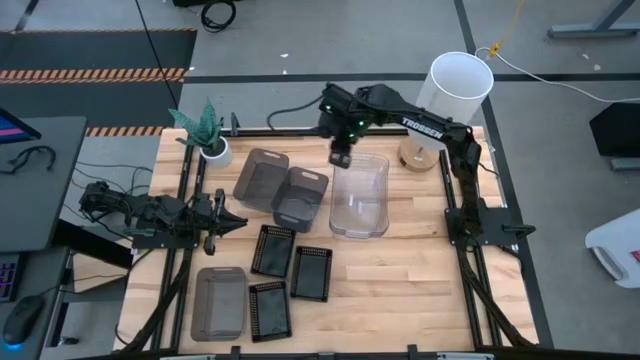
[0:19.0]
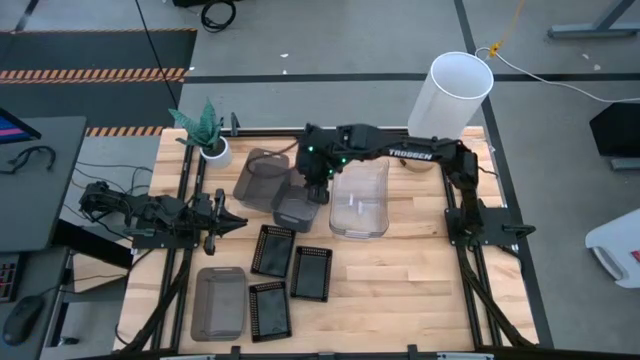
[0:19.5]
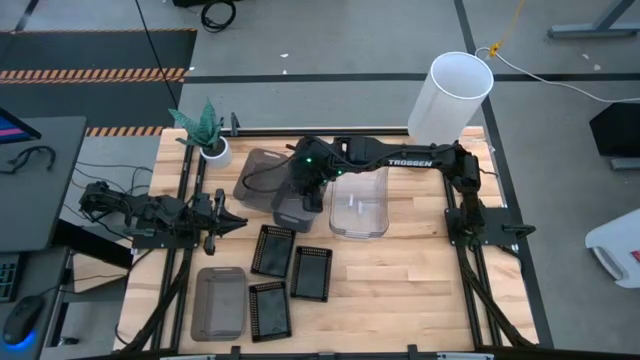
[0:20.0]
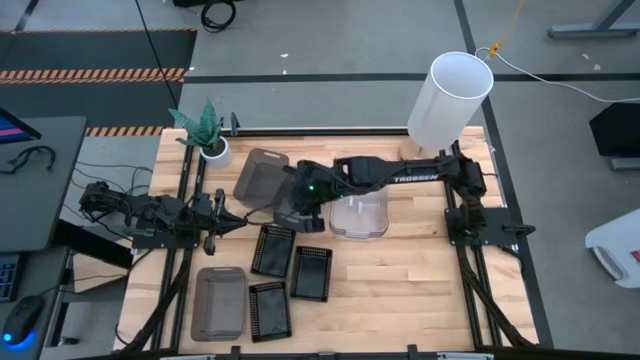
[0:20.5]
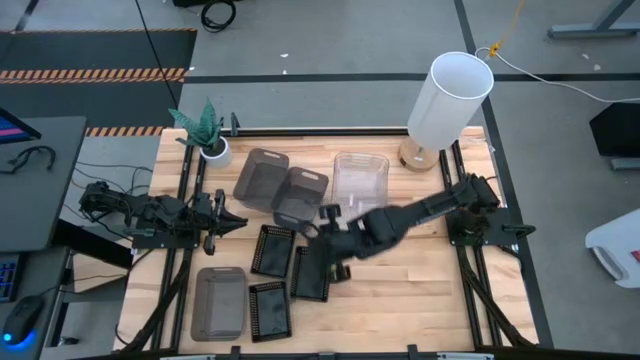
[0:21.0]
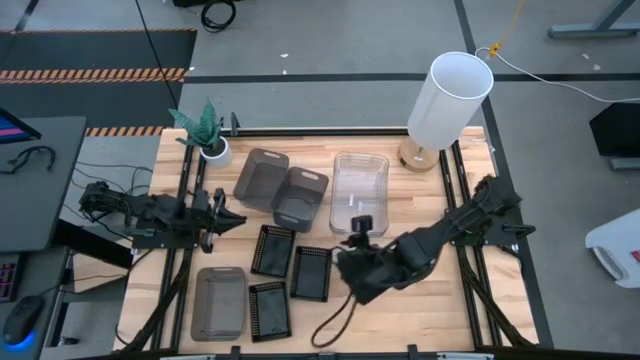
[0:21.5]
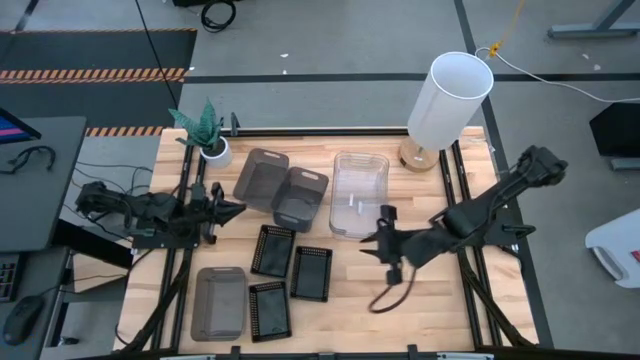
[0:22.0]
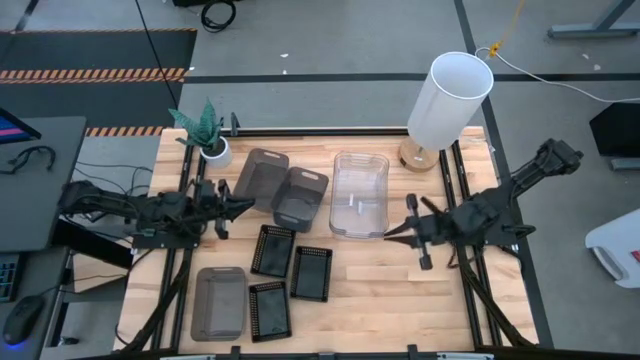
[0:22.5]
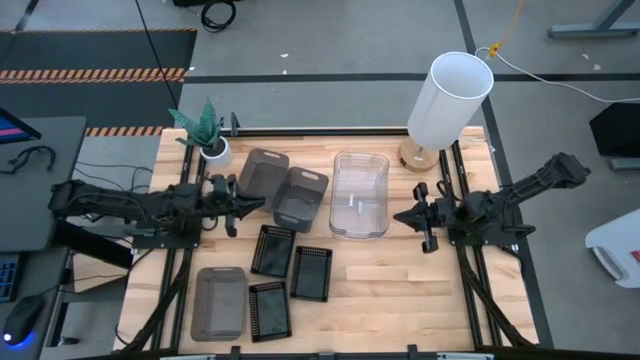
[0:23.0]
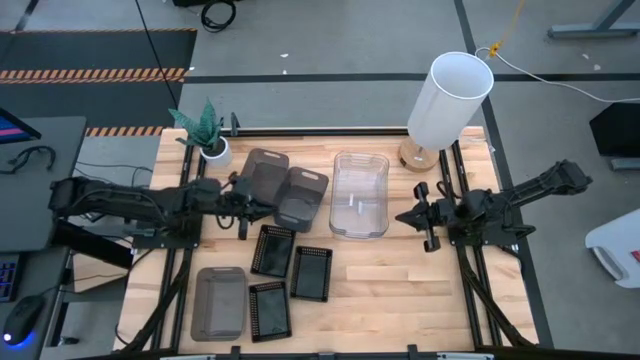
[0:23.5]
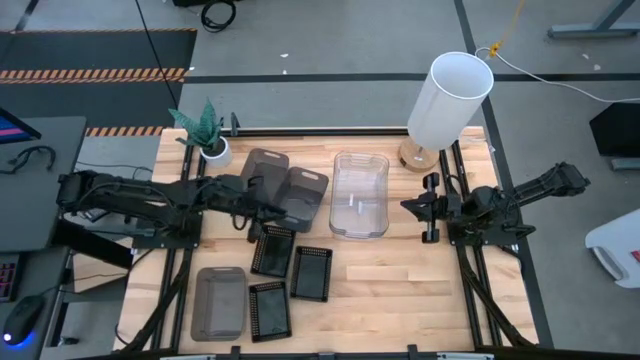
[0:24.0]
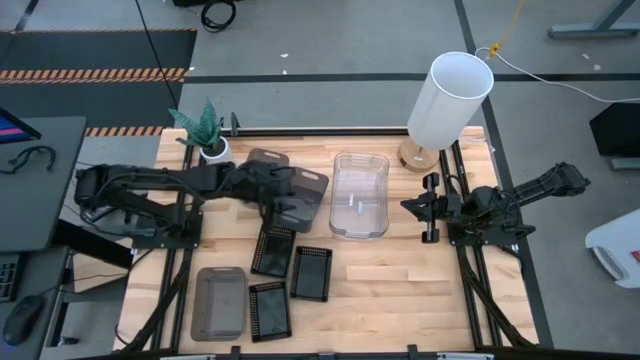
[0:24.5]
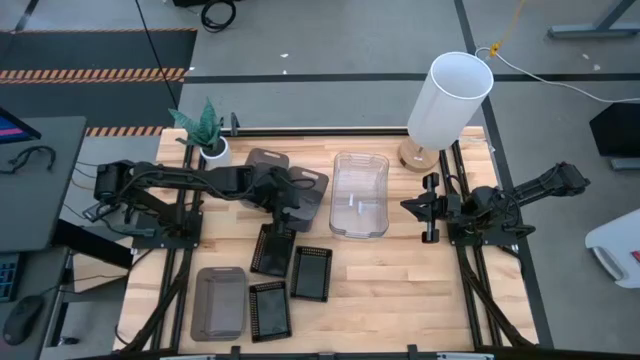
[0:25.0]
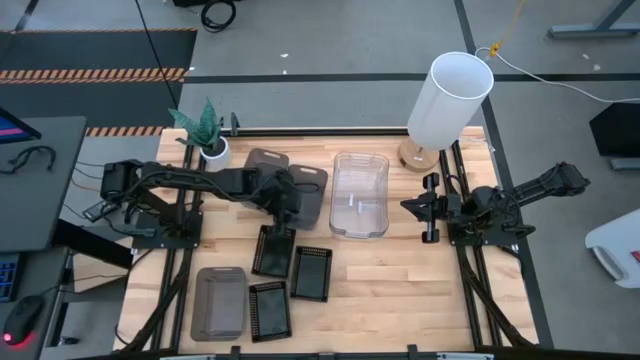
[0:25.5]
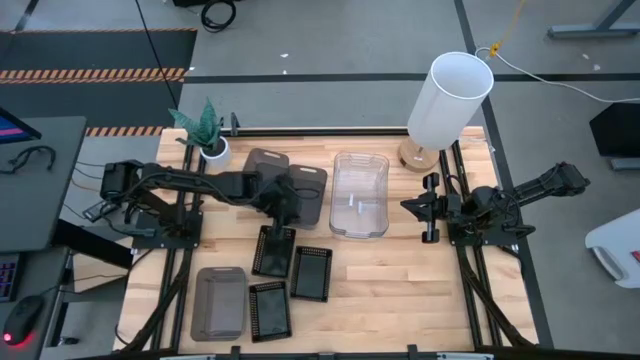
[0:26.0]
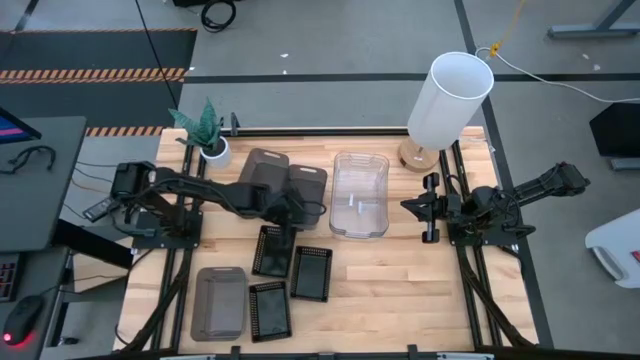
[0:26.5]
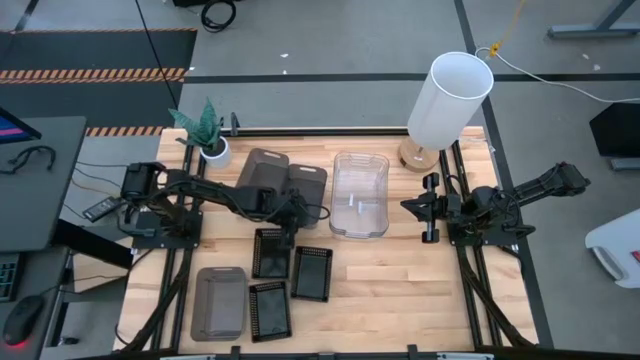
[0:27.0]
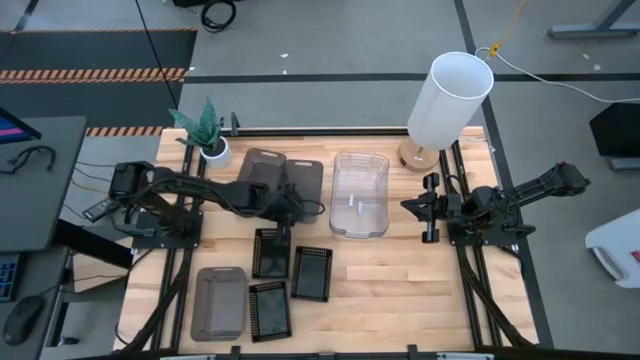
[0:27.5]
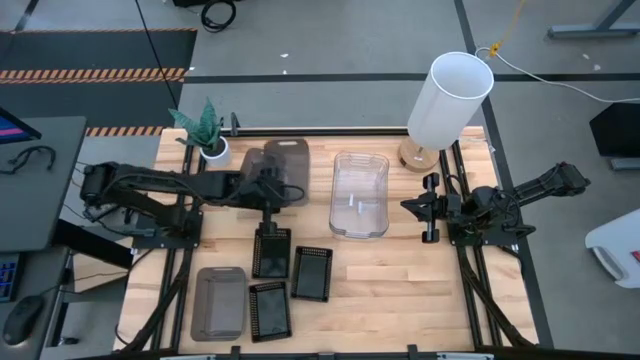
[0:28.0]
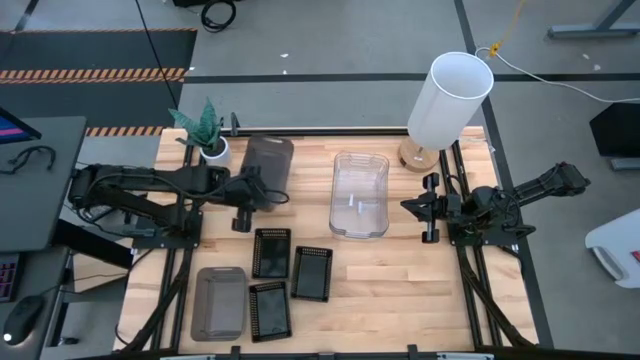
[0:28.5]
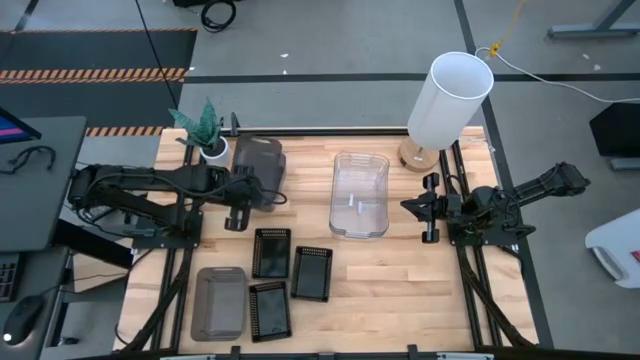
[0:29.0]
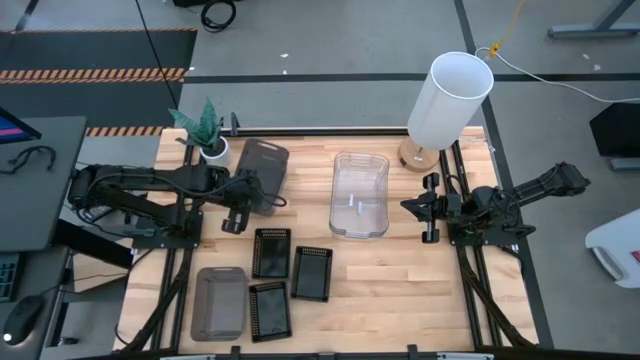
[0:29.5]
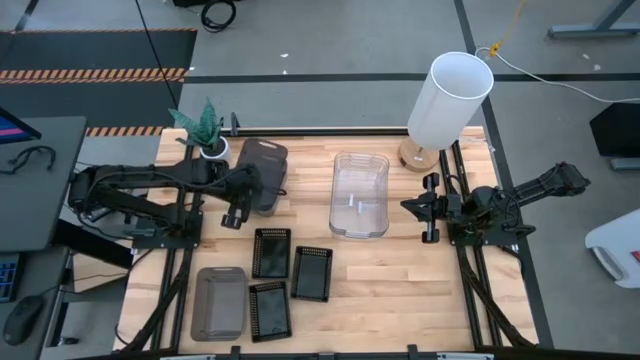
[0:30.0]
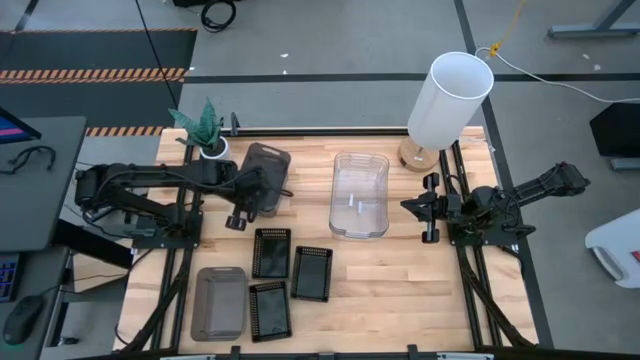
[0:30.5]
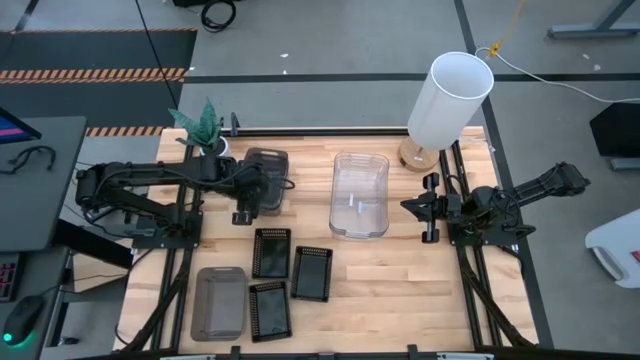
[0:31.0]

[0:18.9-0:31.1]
Stack the top right transparent black bin on the top left transparent black bin

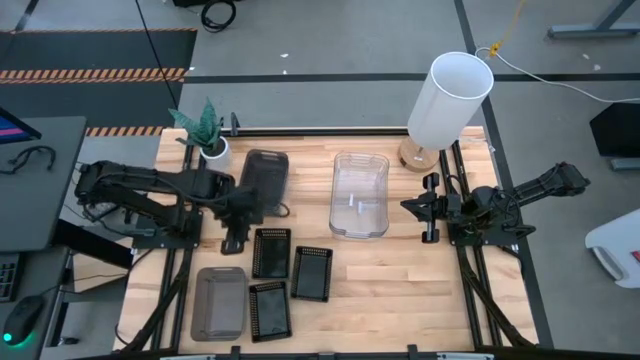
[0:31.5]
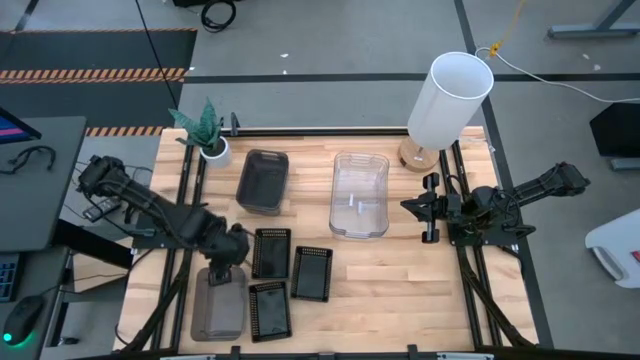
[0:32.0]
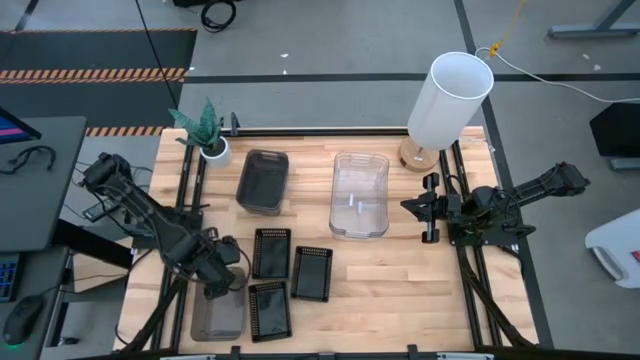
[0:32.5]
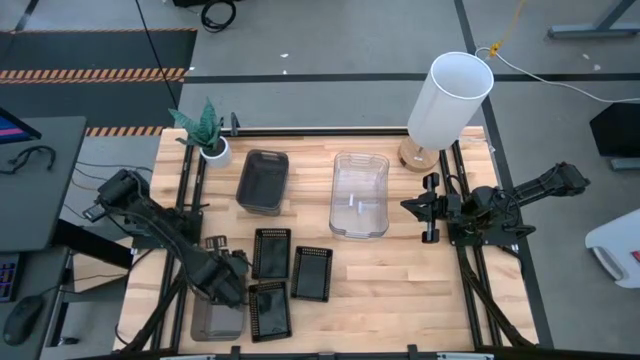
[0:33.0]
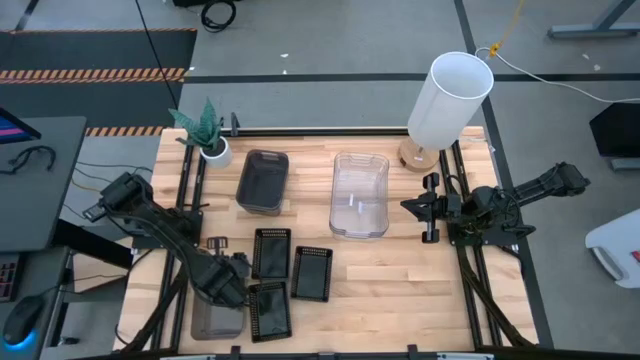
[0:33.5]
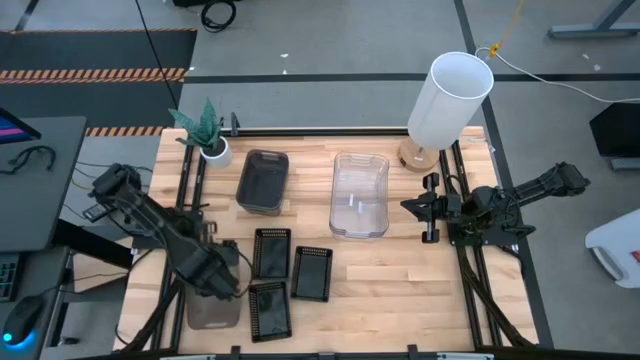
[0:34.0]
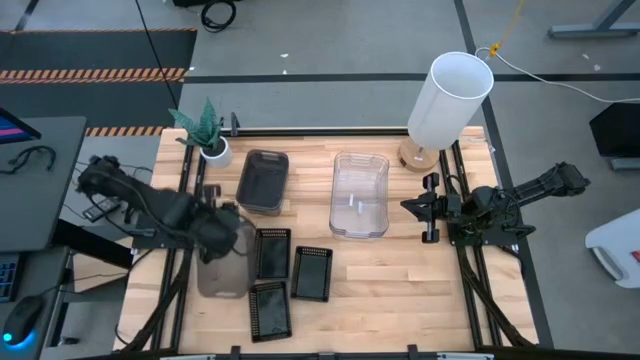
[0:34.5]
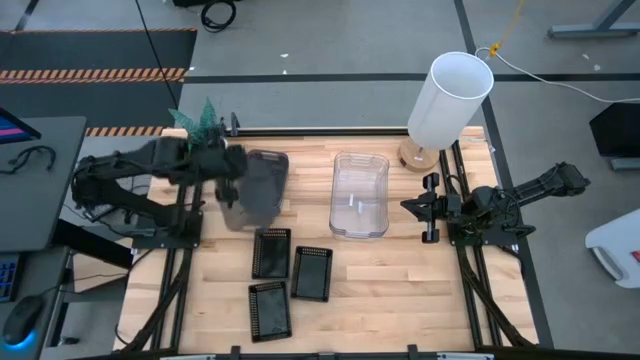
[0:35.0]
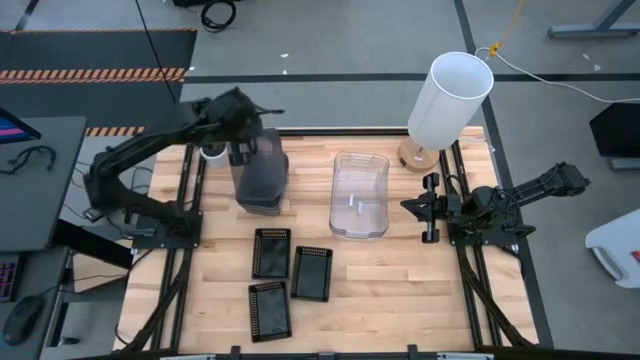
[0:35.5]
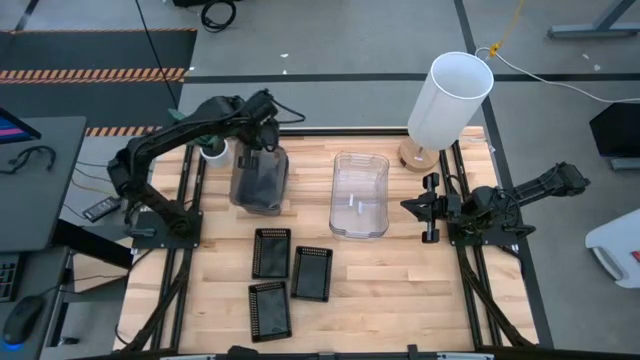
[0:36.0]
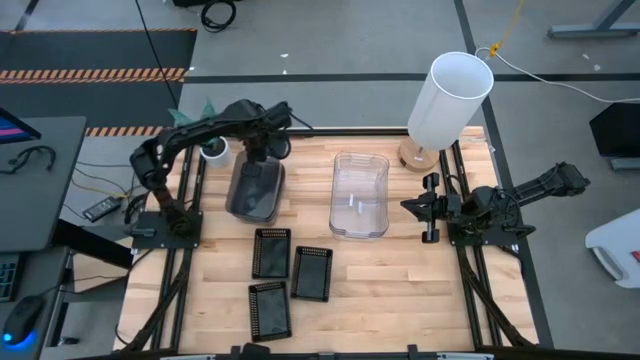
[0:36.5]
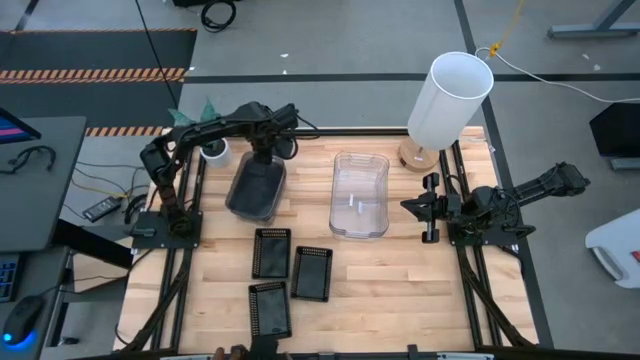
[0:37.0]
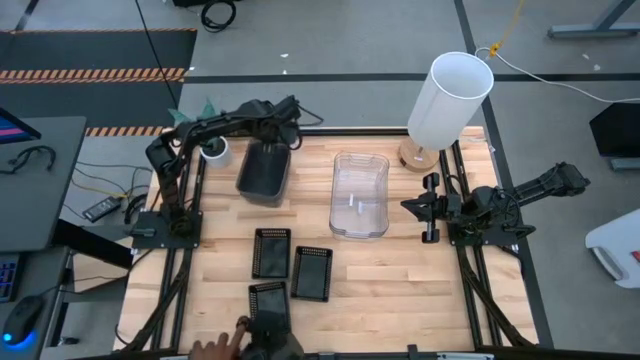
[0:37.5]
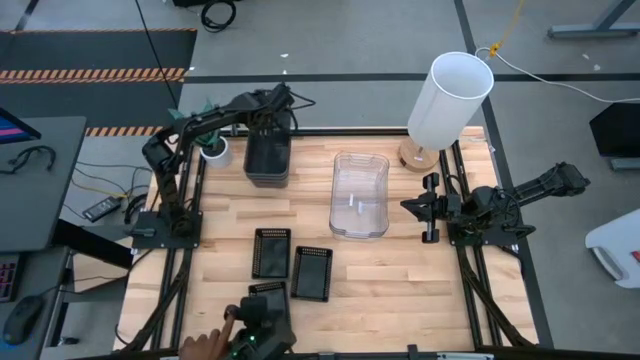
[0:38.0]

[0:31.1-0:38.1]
Stack the bottom transparent black bin on the transparent black bin
